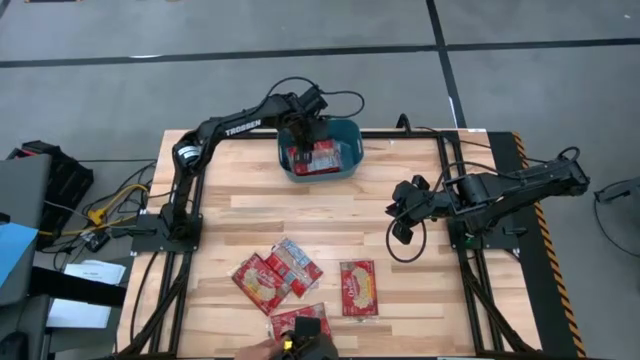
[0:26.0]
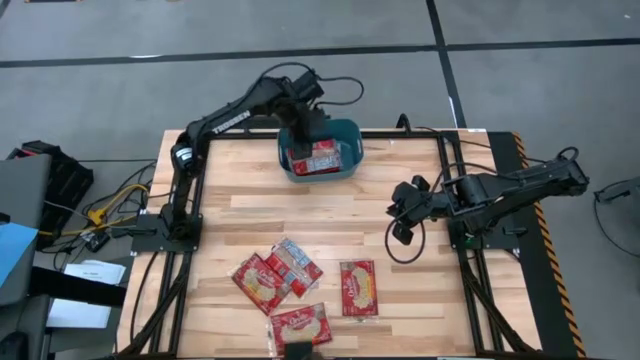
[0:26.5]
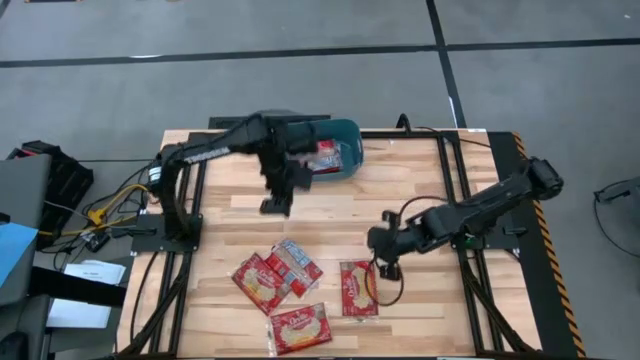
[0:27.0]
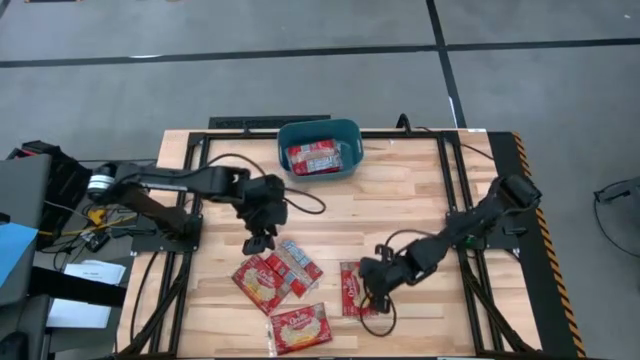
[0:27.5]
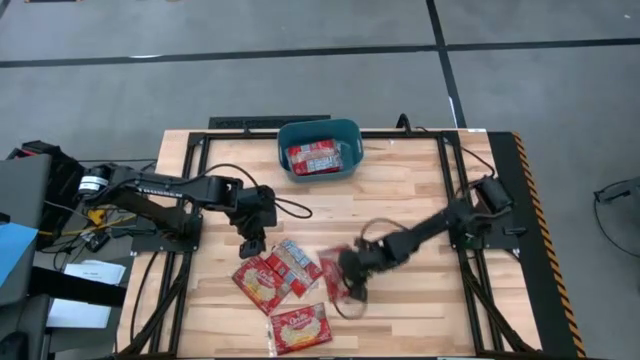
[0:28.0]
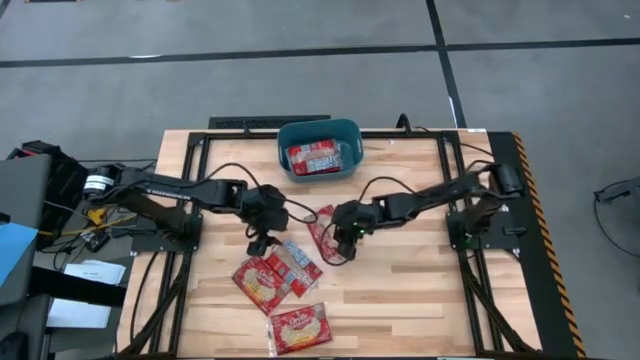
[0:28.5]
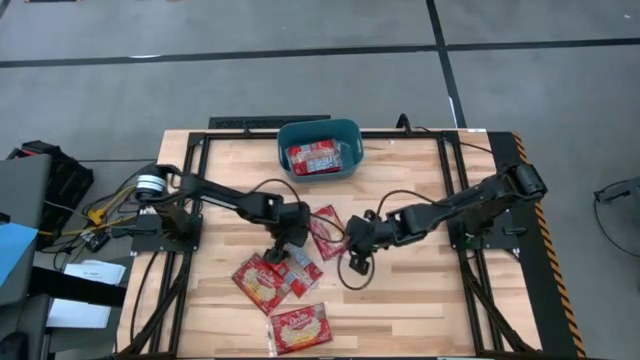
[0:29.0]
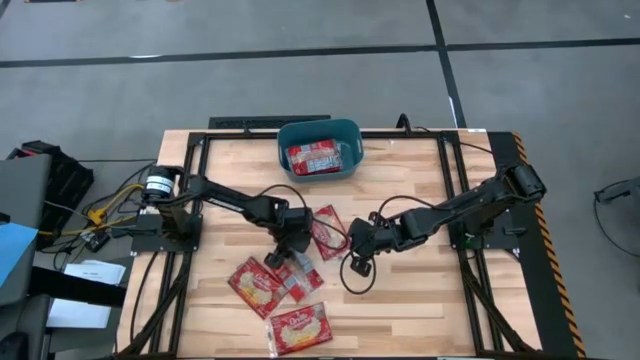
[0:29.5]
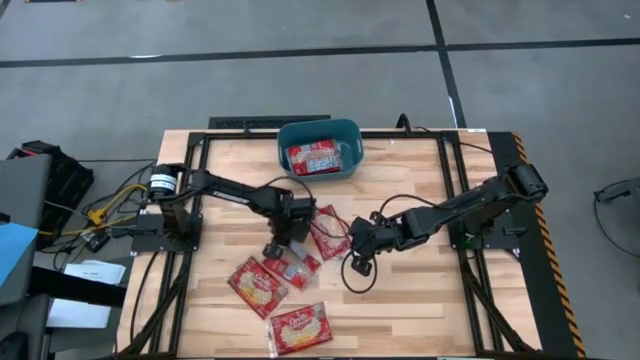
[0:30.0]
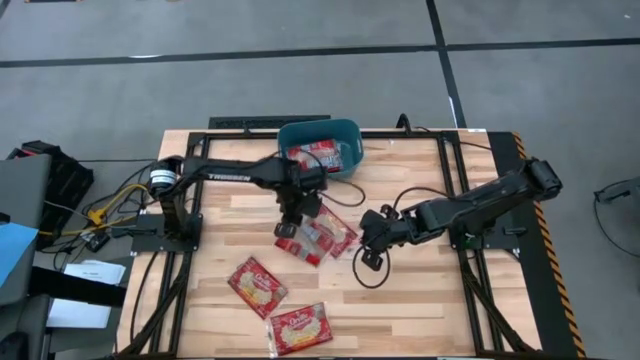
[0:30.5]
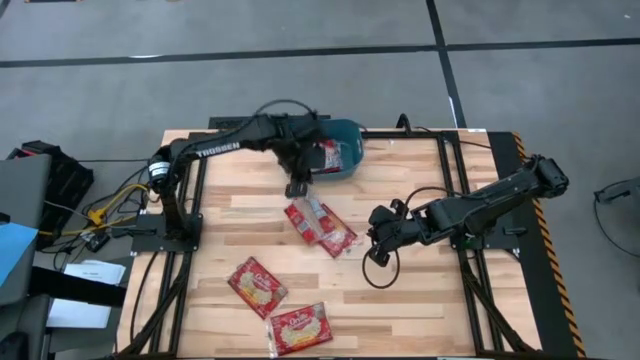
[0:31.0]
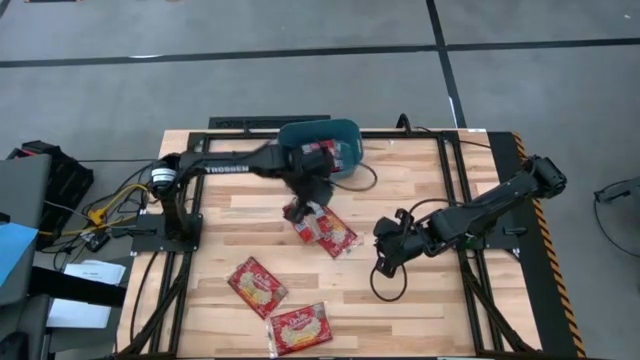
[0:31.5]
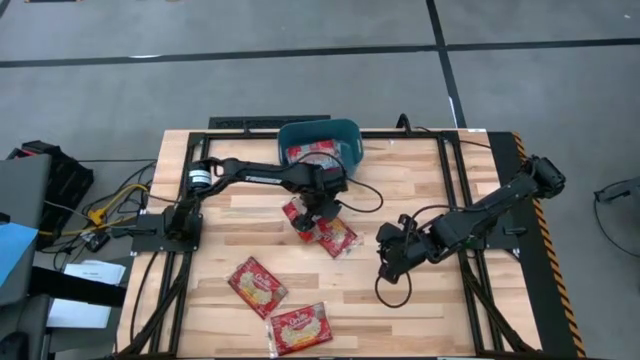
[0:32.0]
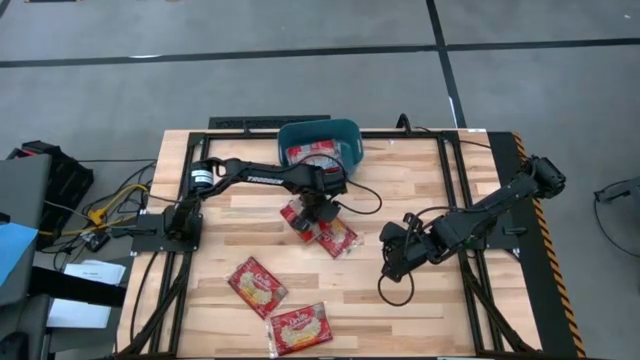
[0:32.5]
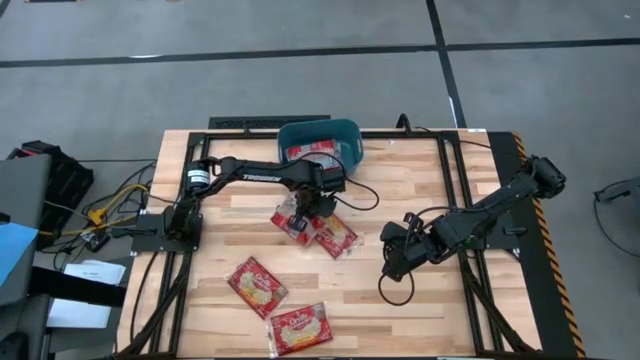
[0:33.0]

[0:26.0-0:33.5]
Task: Sort popcorn bags into baskets
Put the red popcorn bag into the blue bin

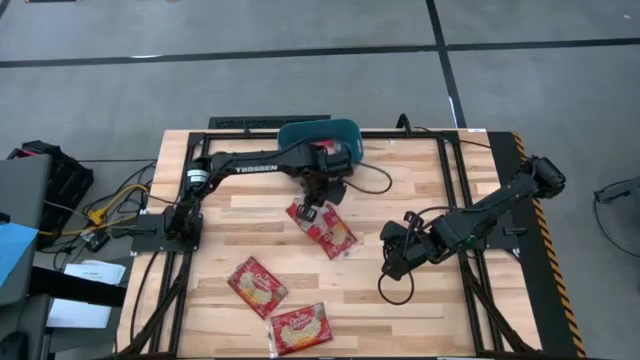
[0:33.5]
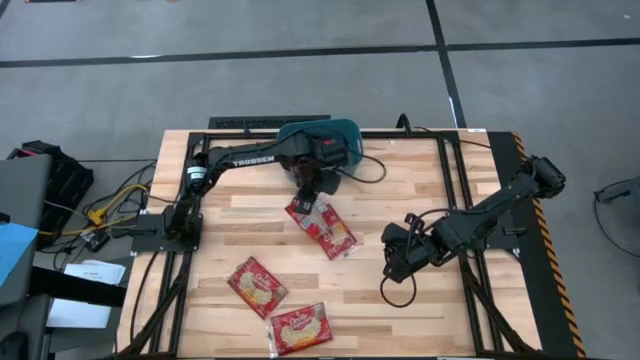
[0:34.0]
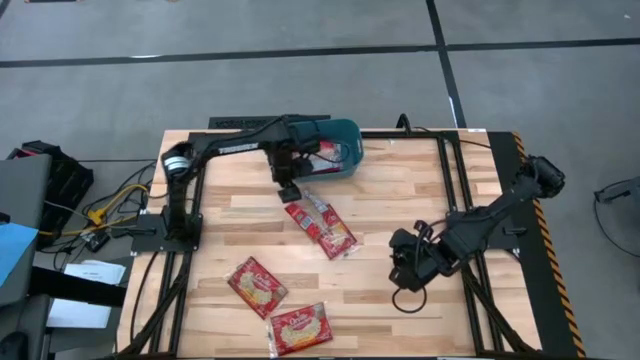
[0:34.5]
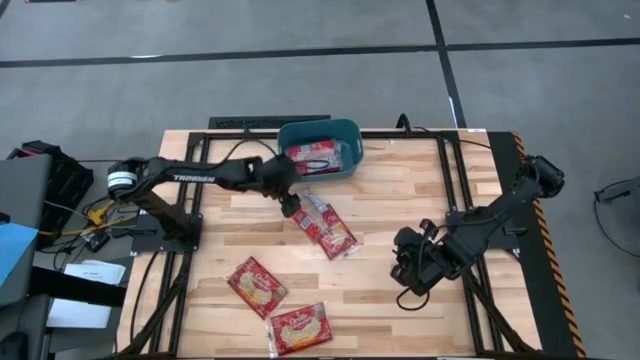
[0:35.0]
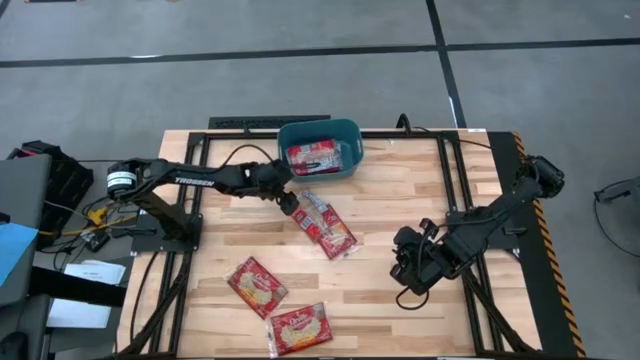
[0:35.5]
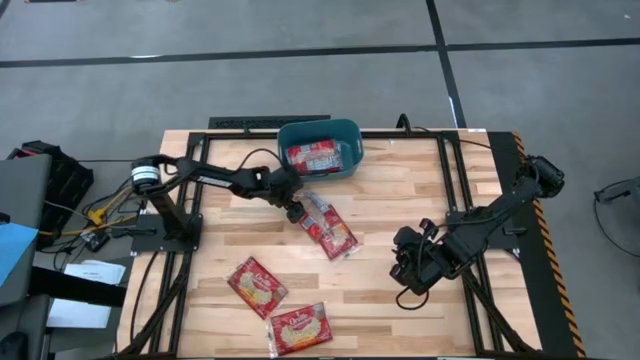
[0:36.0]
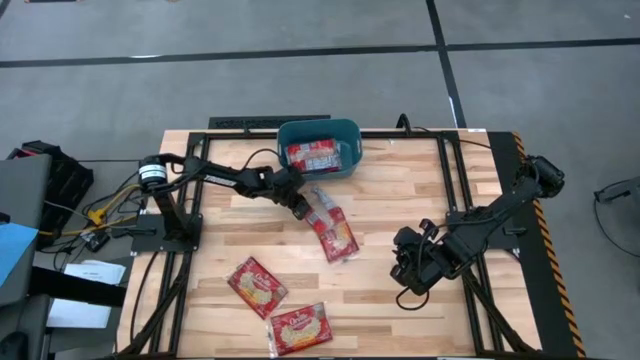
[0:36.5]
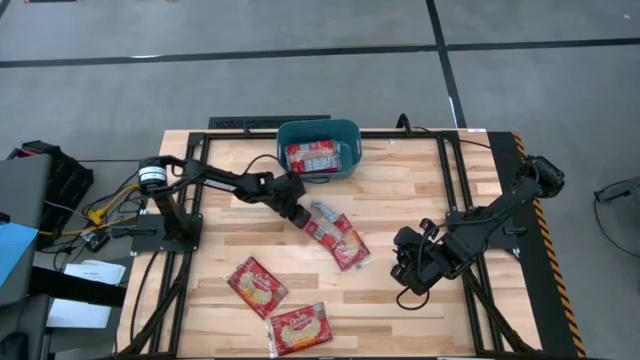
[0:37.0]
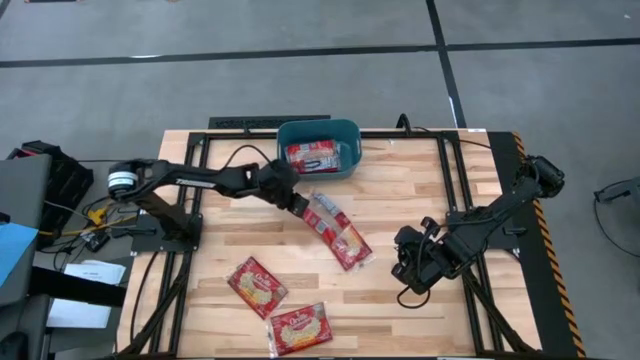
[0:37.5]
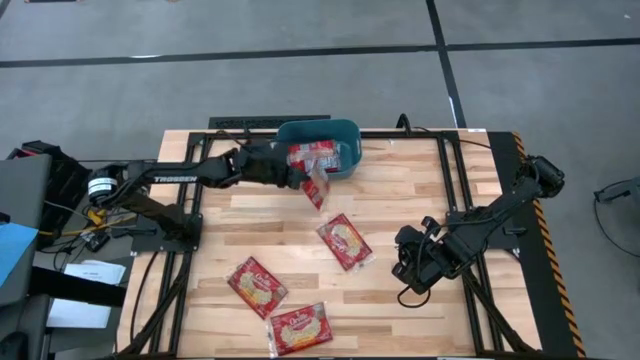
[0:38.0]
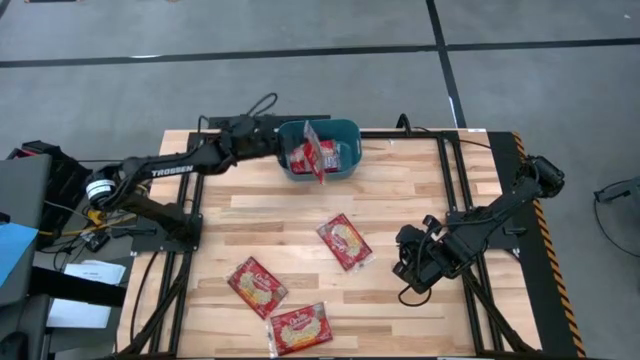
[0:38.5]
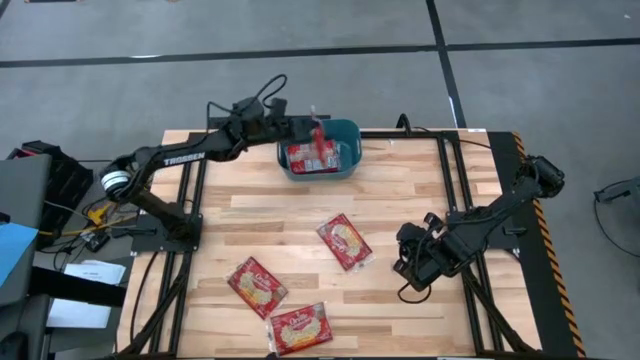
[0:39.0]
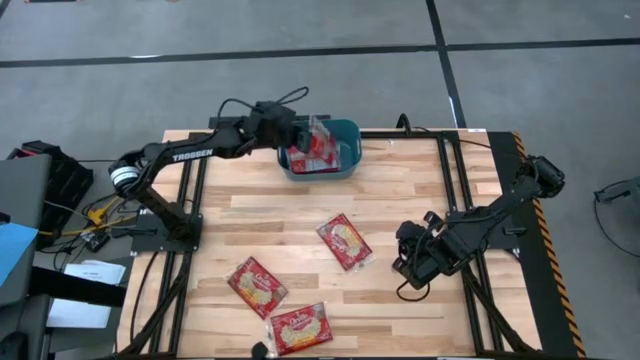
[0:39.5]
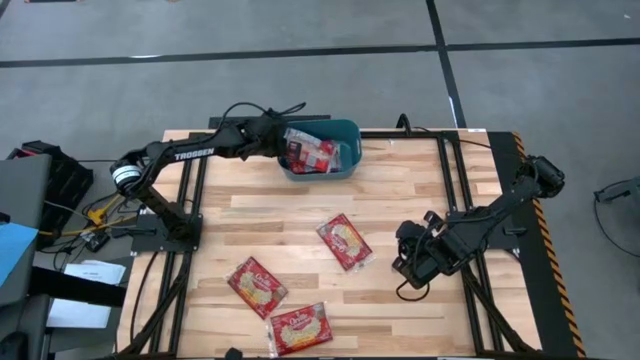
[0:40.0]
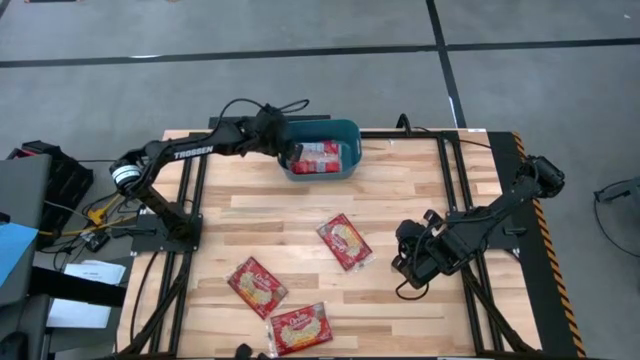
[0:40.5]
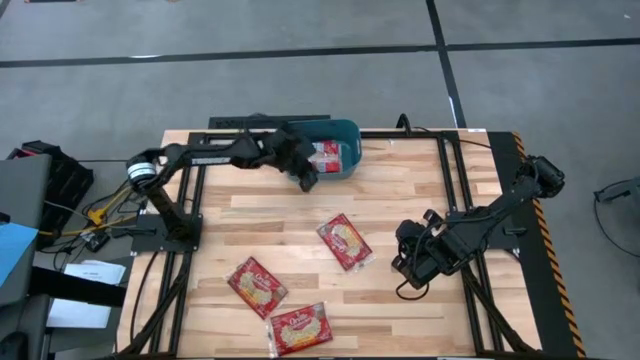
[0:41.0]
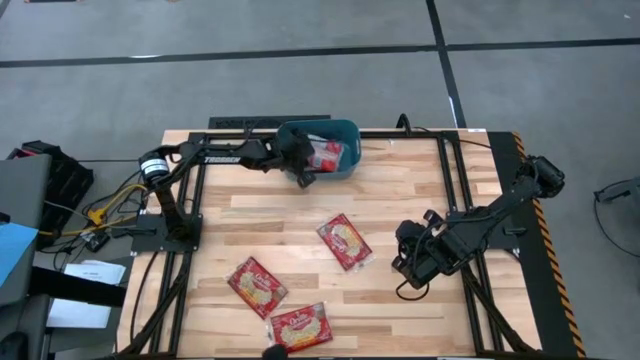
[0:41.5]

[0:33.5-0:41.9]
Put the red popcorn bag into the blue bin

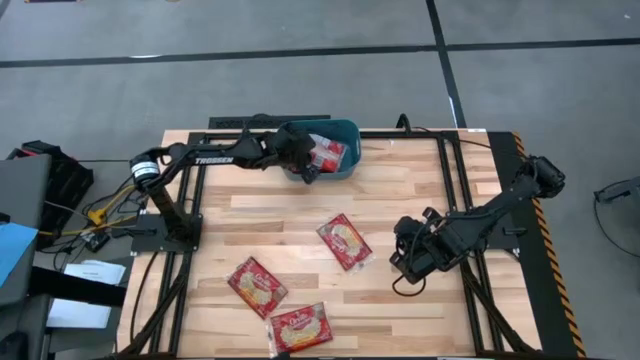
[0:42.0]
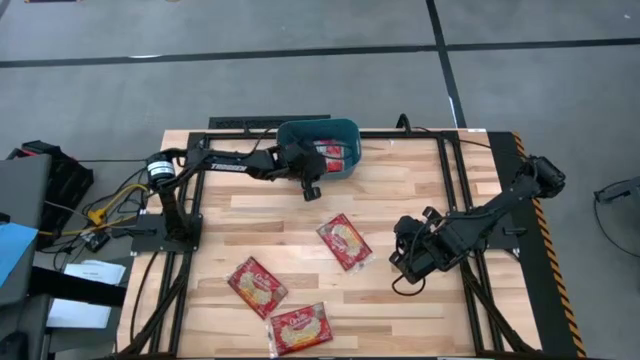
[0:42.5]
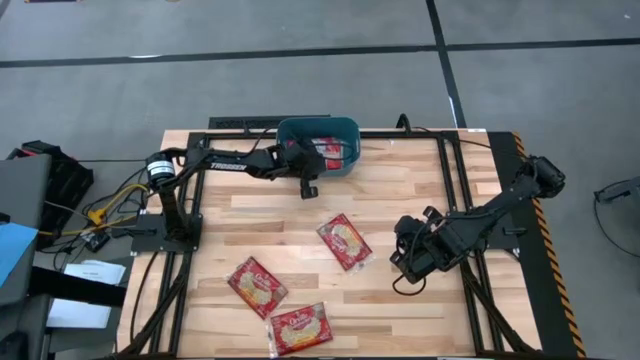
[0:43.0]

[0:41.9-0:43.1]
Adjust the blue bin

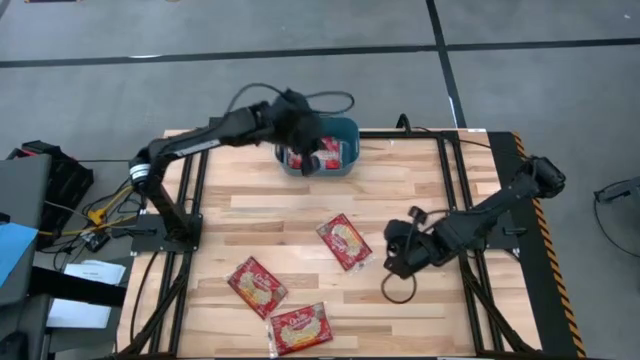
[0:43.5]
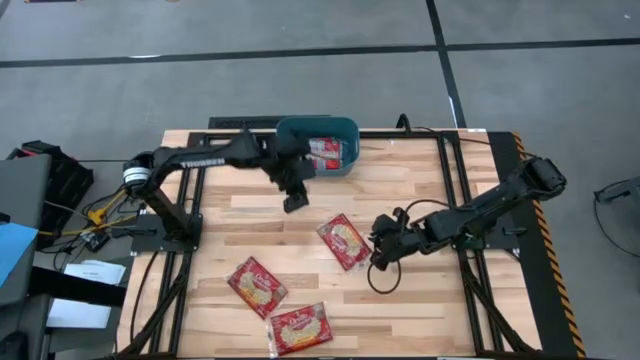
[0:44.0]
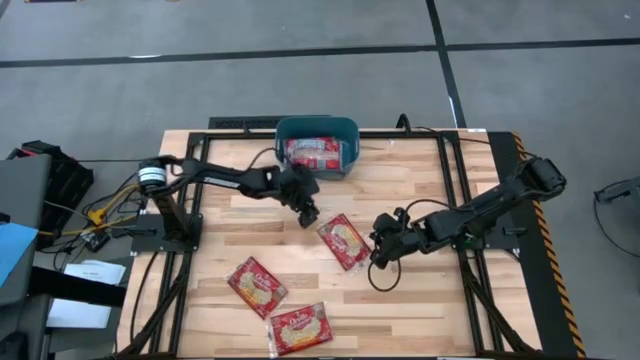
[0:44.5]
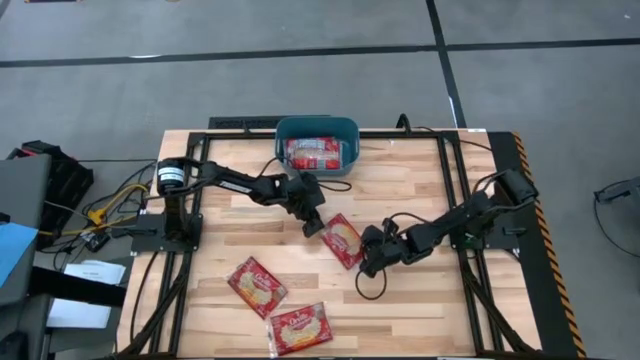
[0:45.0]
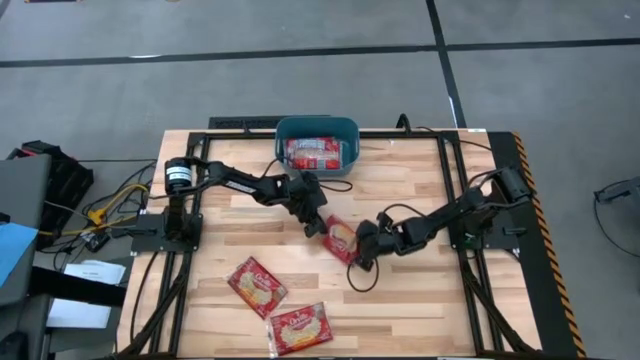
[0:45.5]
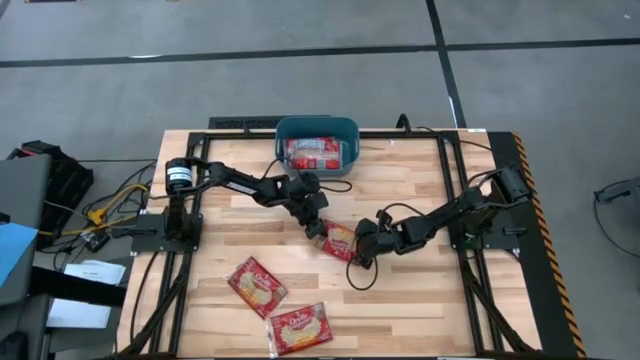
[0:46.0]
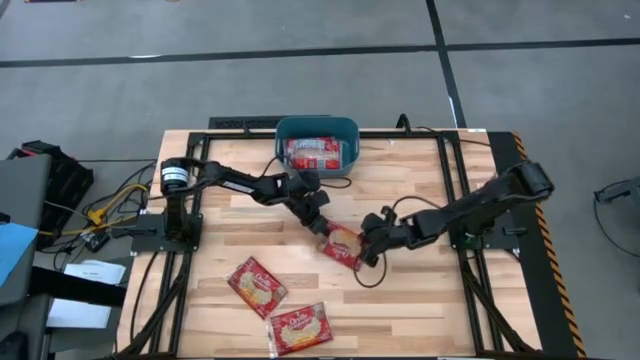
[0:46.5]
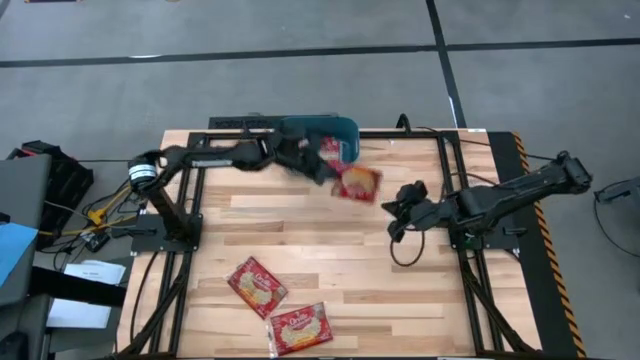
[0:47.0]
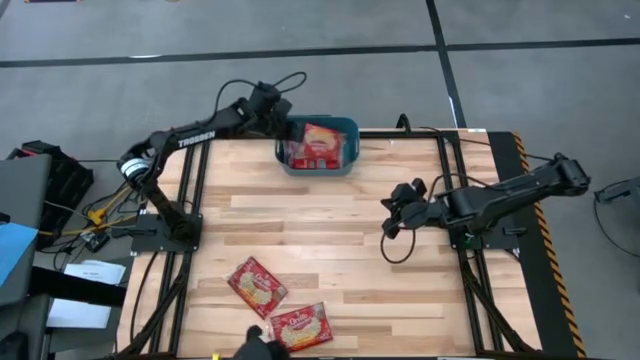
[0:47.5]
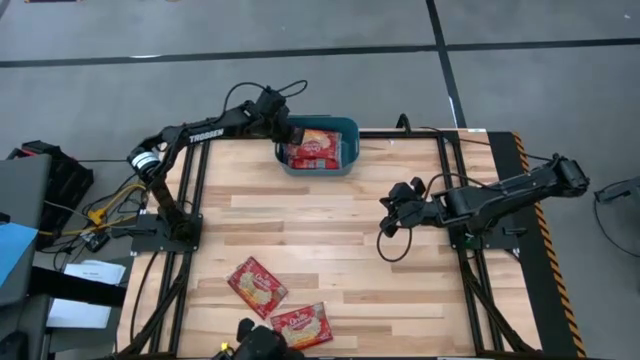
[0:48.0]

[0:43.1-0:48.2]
Put the top right red popcorn bag into the blue bin
